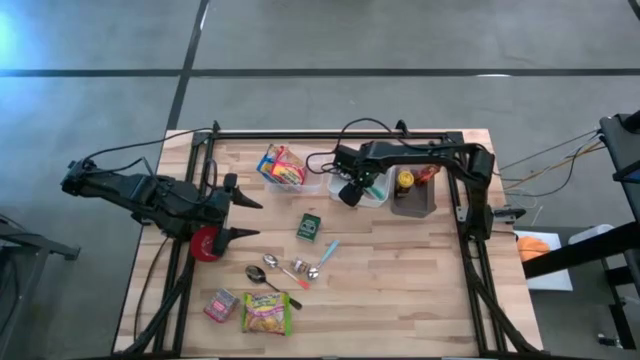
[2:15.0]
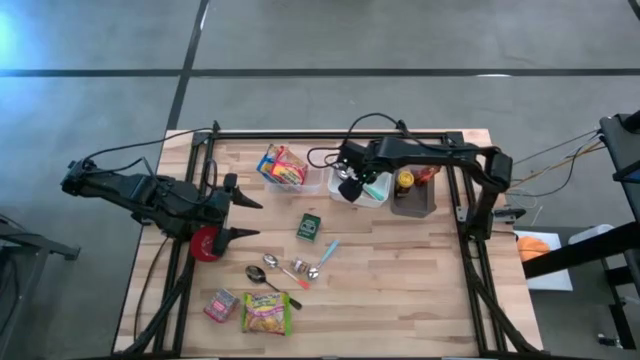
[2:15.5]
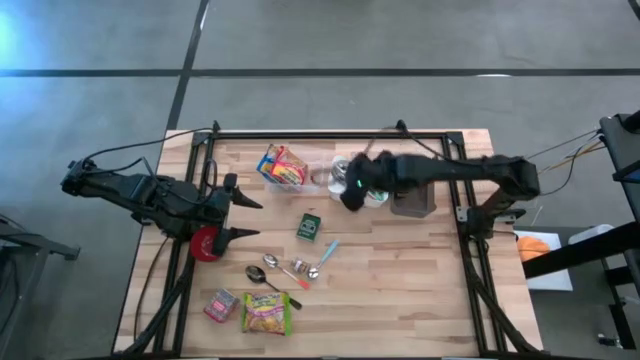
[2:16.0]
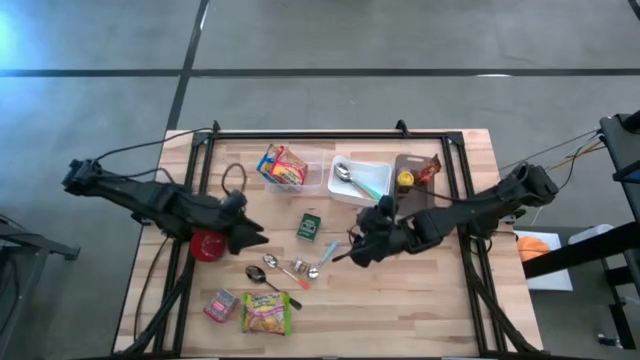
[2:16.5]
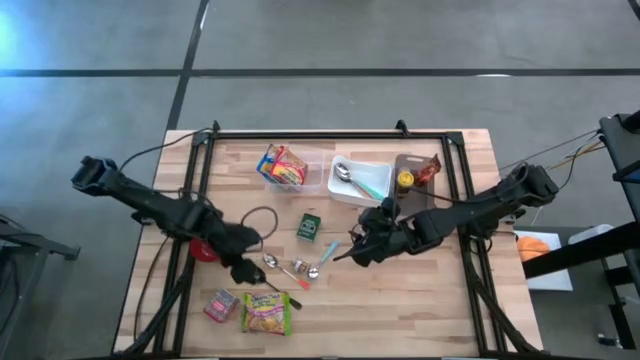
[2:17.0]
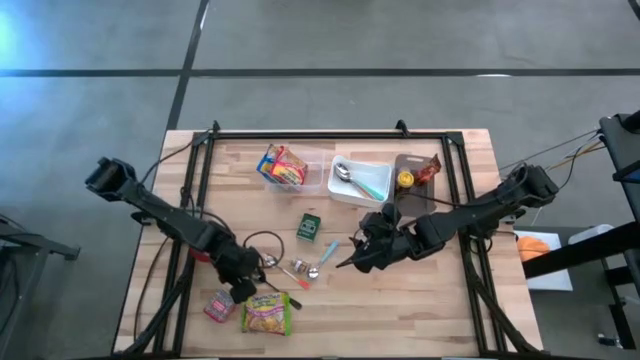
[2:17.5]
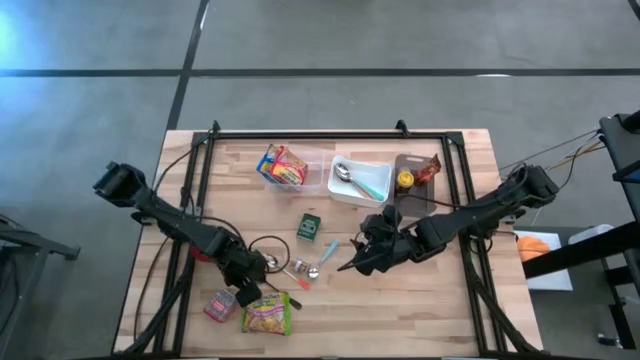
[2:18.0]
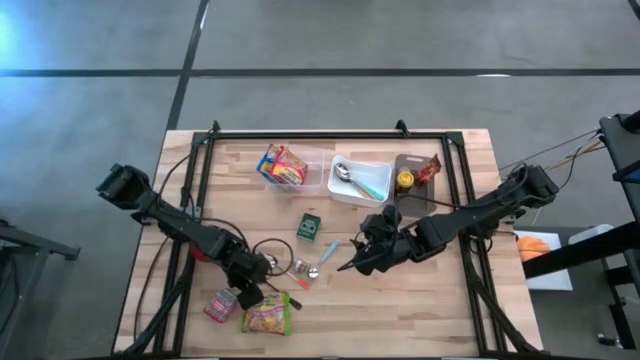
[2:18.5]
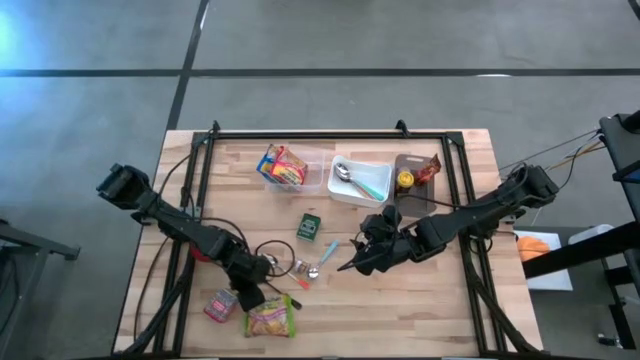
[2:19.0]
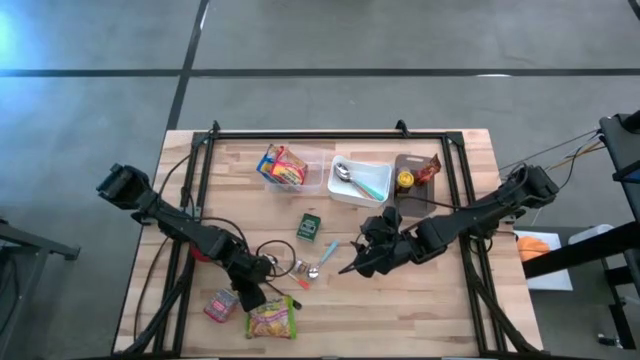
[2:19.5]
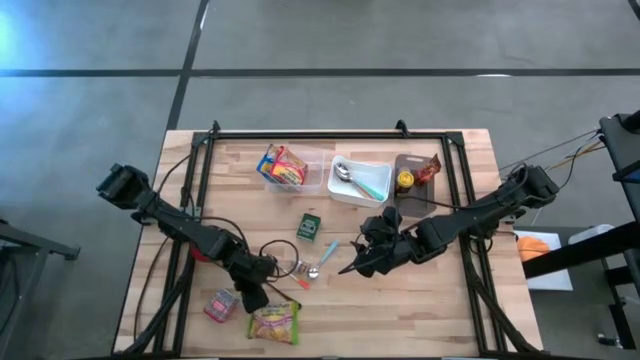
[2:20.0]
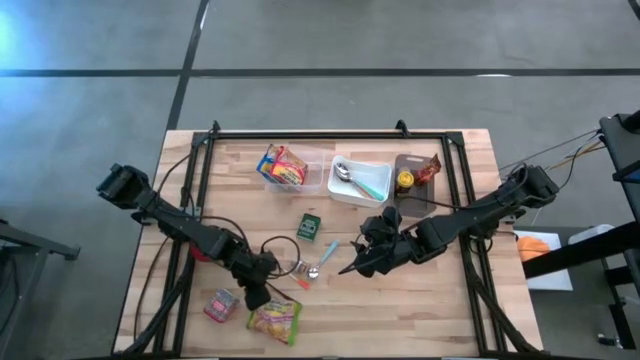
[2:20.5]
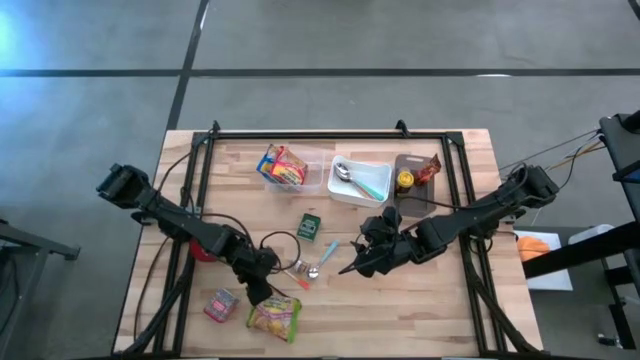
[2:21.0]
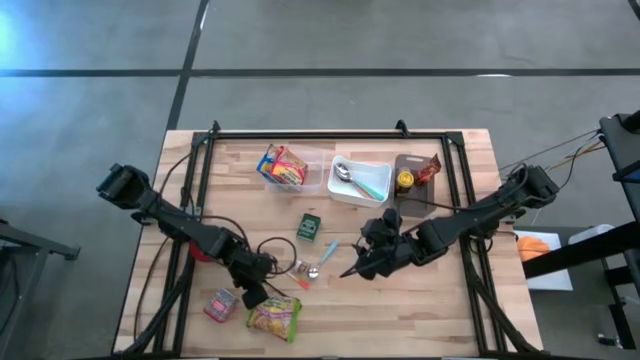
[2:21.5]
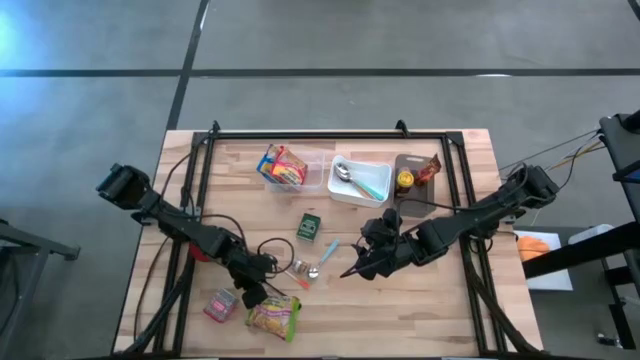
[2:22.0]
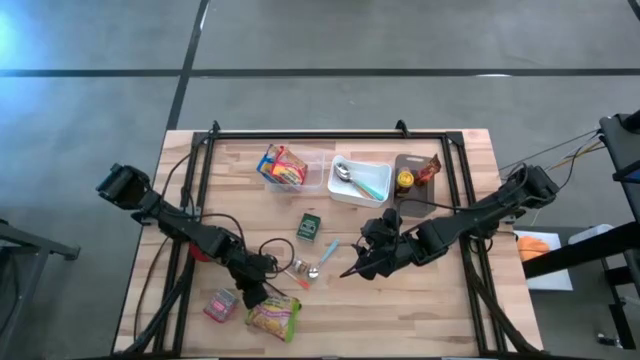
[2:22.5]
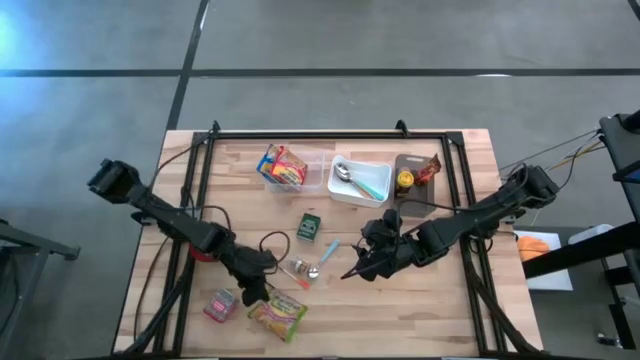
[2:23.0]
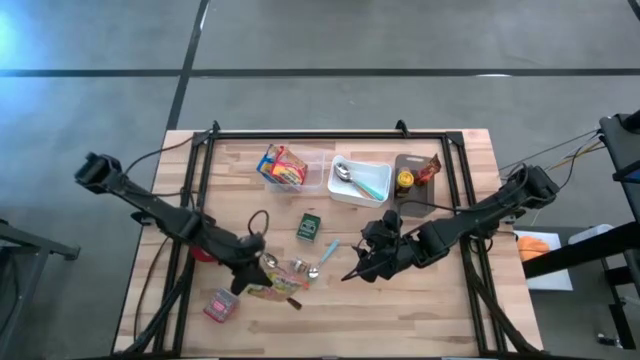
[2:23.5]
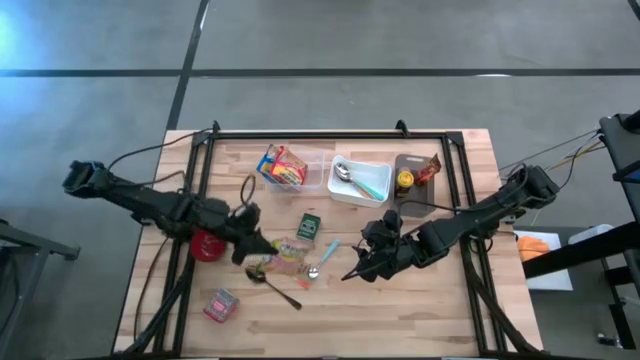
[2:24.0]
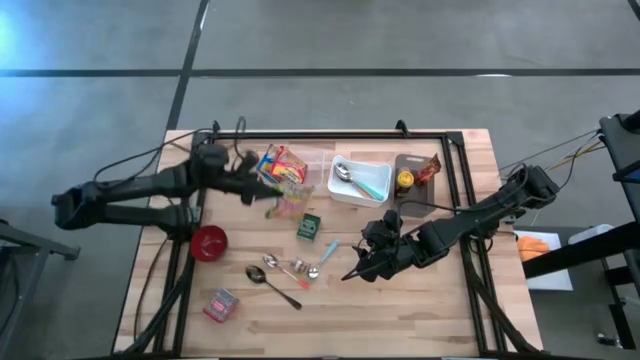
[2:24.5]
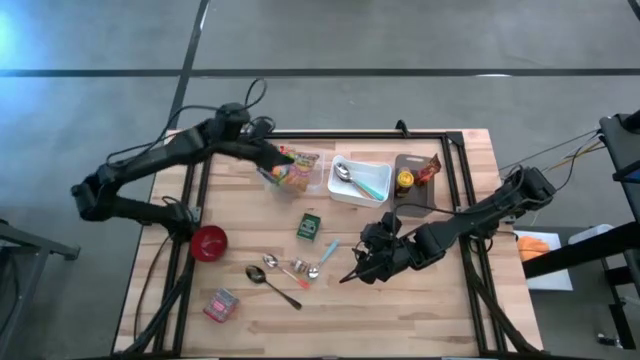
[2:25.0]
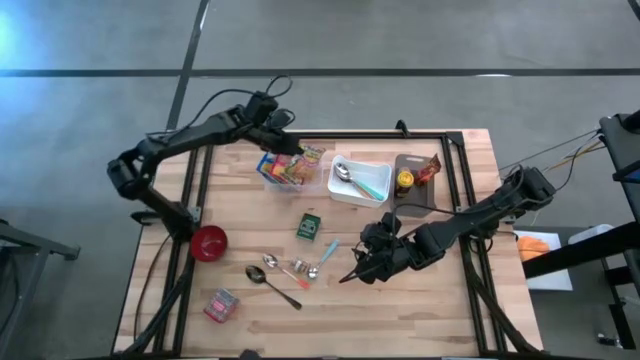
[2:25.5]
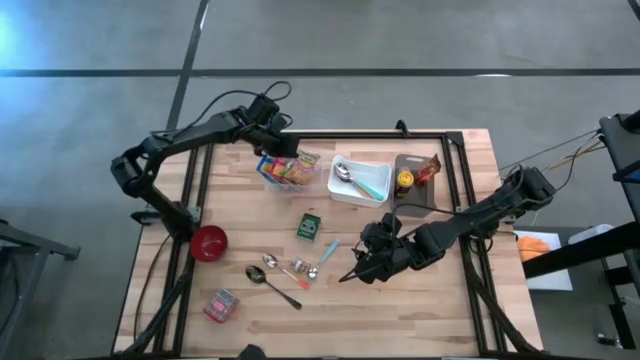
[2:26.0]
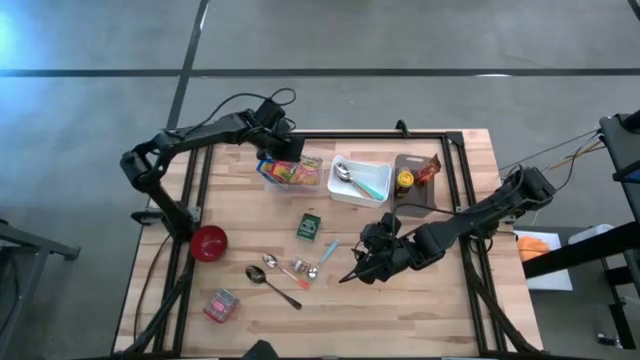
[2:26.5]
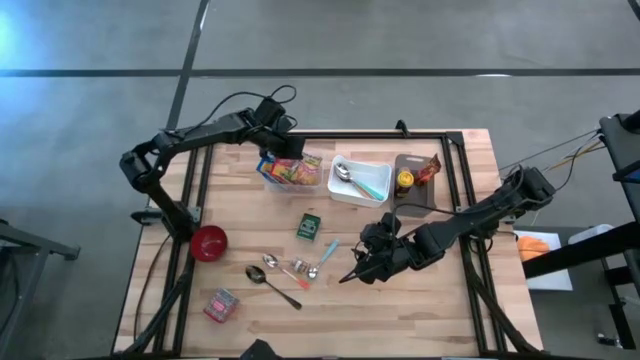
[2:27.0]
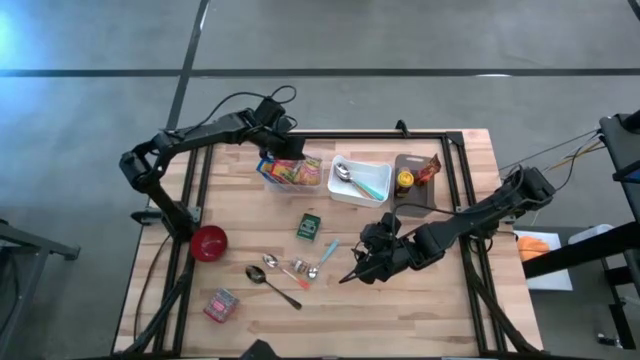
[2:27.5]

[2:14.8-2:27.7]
Put the green noodle pack into the transparent bin
